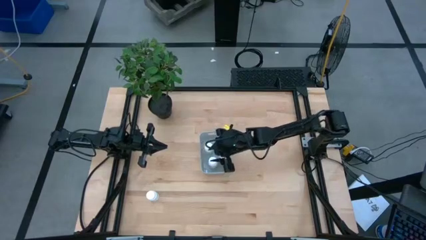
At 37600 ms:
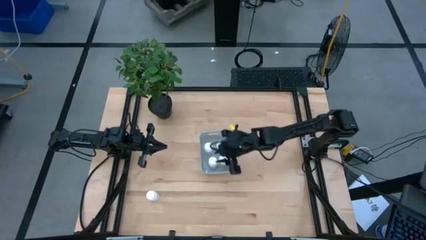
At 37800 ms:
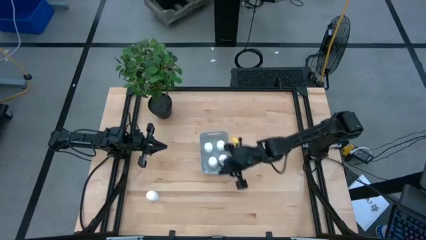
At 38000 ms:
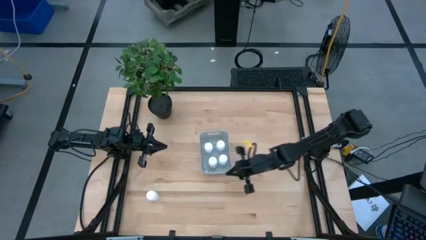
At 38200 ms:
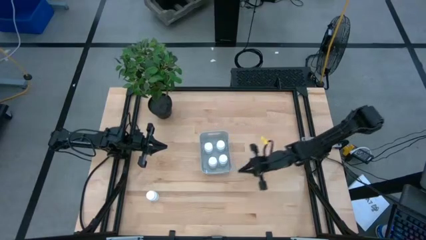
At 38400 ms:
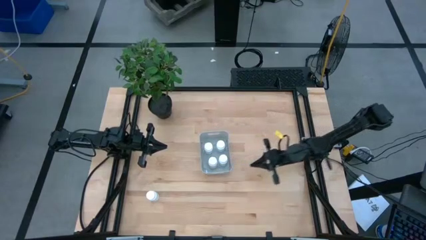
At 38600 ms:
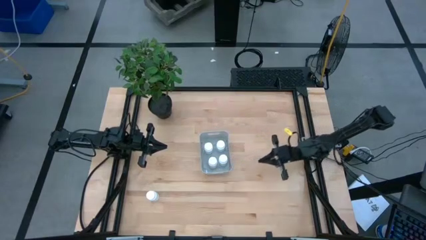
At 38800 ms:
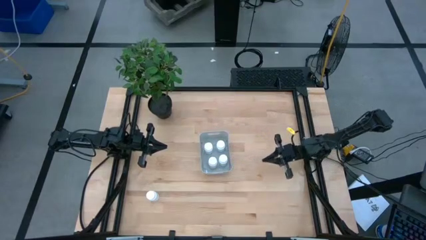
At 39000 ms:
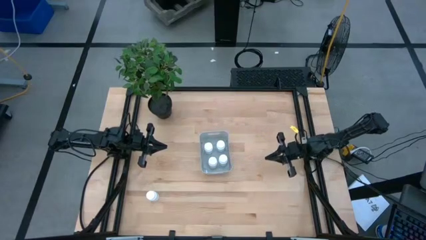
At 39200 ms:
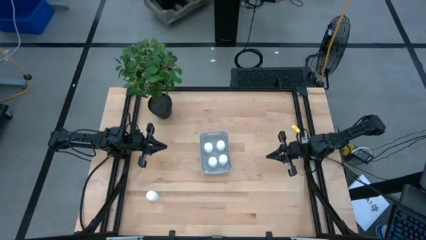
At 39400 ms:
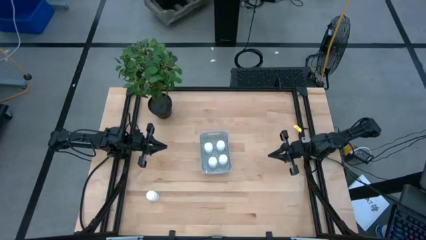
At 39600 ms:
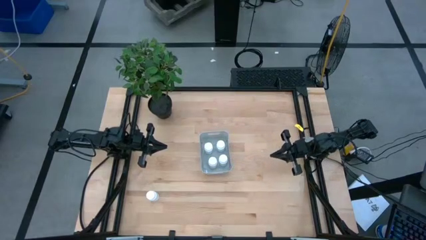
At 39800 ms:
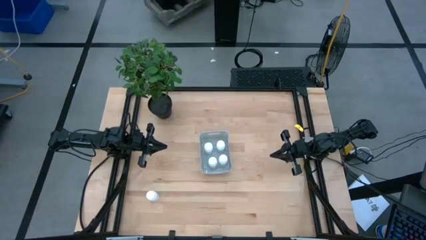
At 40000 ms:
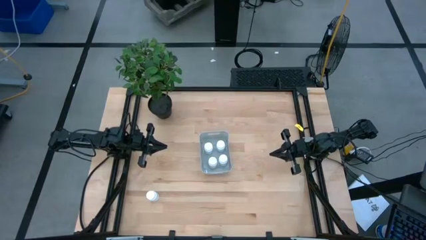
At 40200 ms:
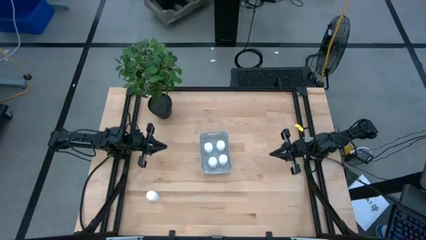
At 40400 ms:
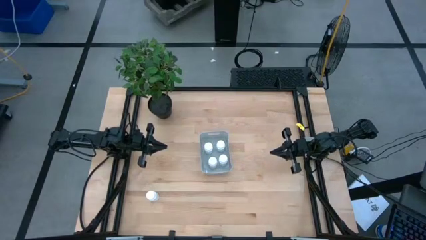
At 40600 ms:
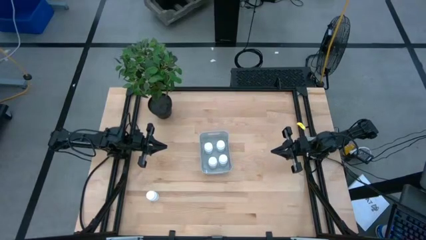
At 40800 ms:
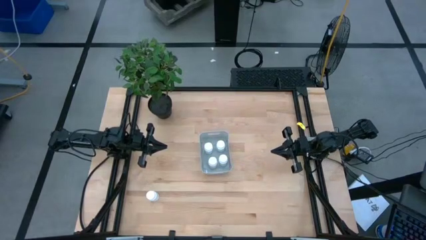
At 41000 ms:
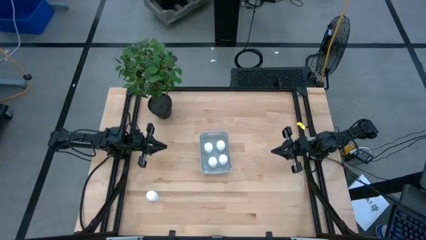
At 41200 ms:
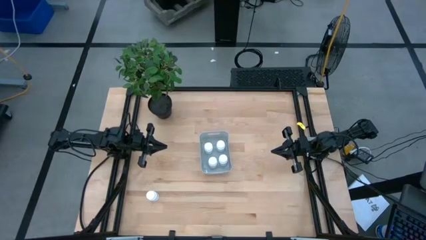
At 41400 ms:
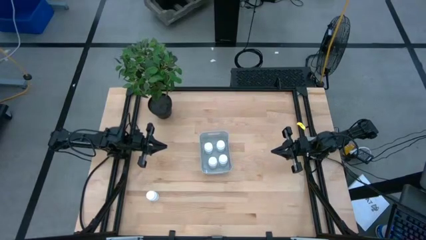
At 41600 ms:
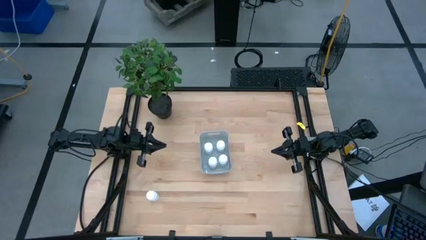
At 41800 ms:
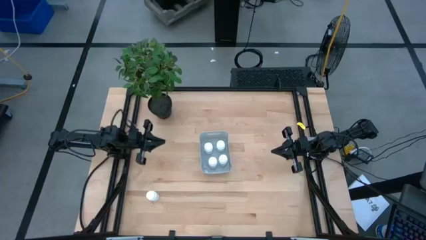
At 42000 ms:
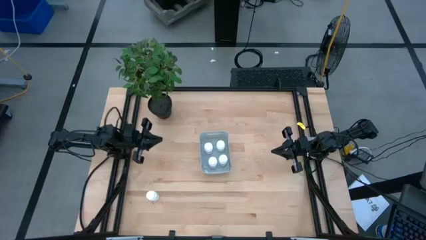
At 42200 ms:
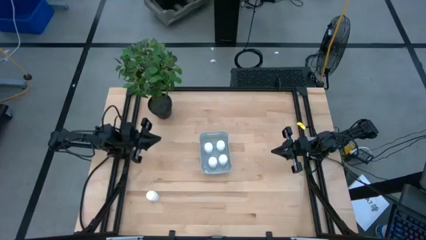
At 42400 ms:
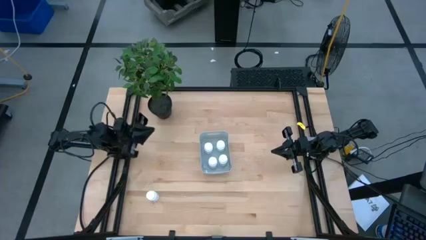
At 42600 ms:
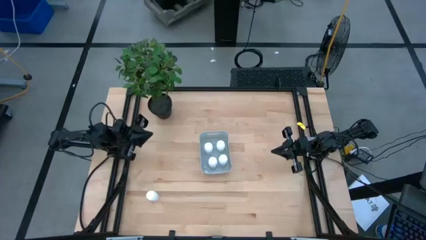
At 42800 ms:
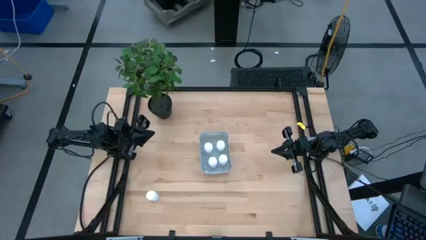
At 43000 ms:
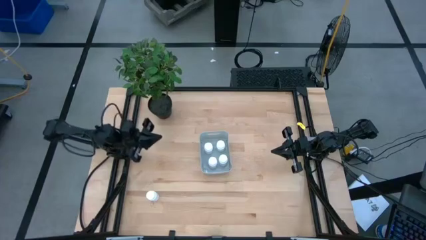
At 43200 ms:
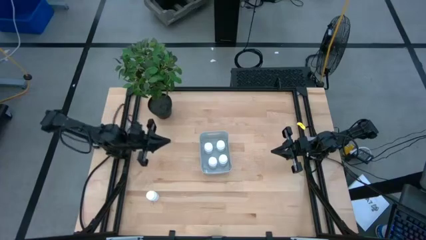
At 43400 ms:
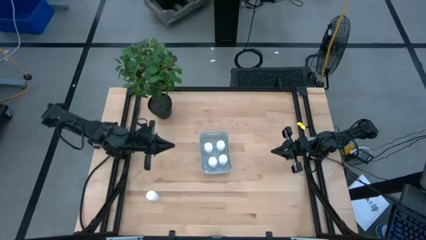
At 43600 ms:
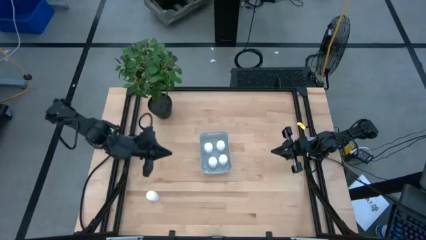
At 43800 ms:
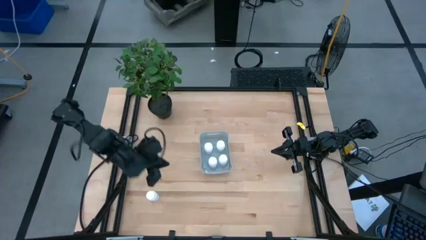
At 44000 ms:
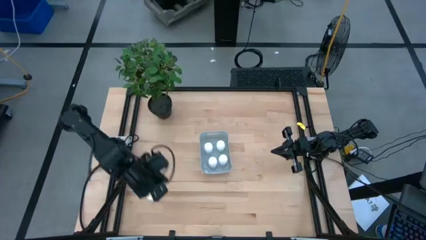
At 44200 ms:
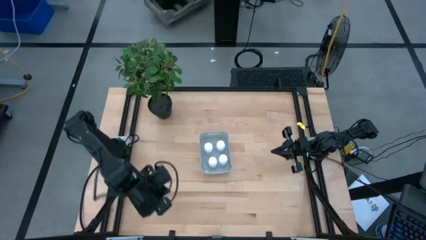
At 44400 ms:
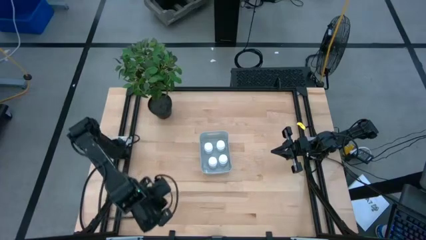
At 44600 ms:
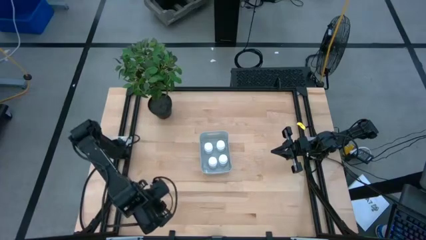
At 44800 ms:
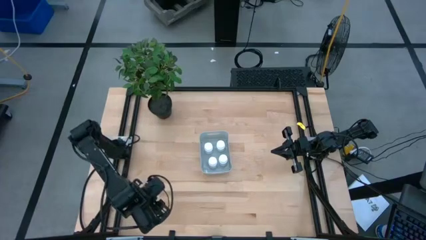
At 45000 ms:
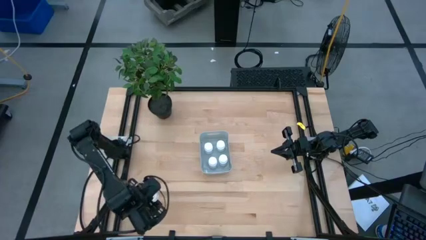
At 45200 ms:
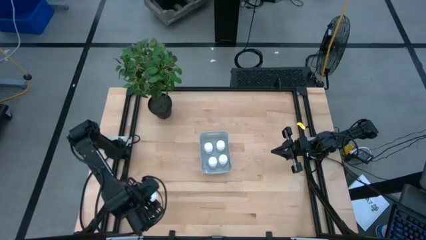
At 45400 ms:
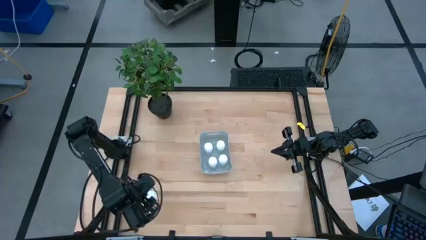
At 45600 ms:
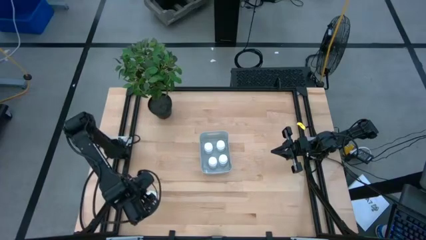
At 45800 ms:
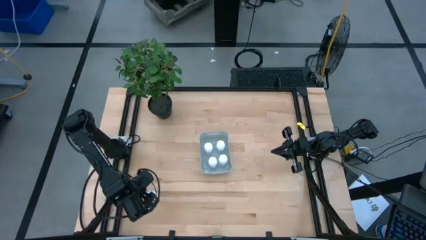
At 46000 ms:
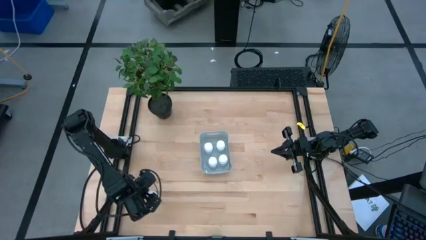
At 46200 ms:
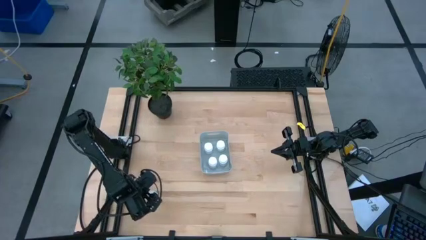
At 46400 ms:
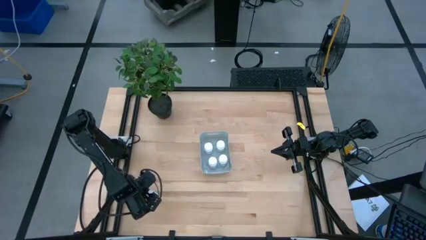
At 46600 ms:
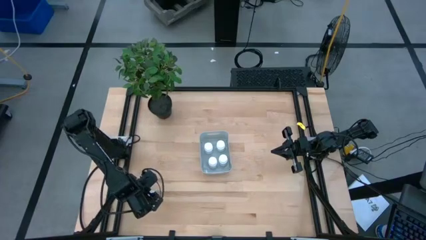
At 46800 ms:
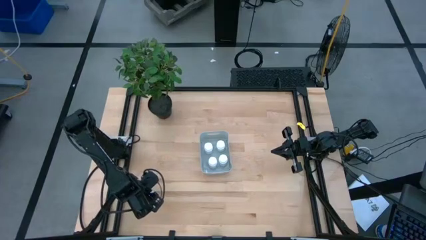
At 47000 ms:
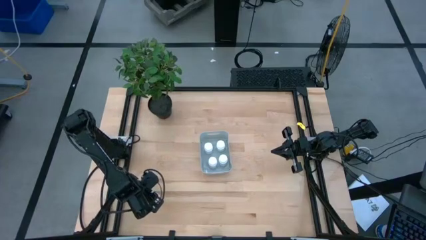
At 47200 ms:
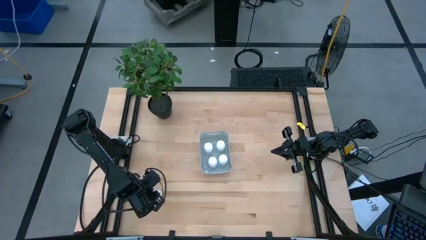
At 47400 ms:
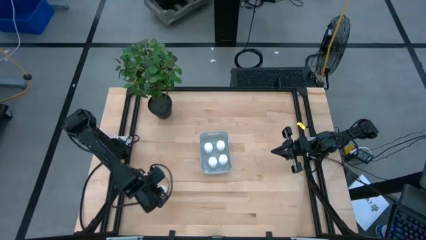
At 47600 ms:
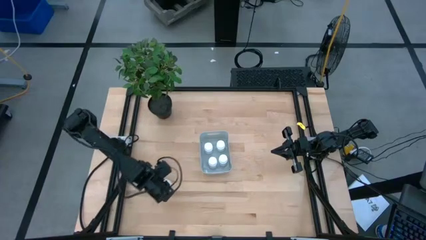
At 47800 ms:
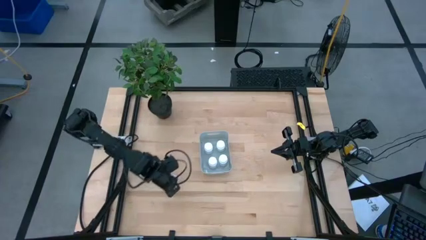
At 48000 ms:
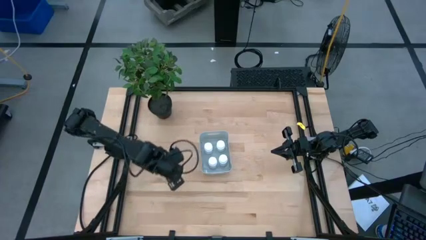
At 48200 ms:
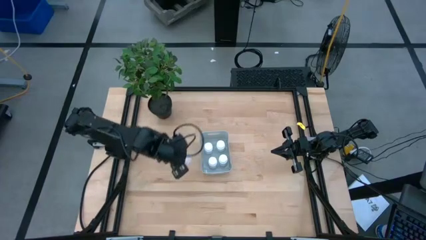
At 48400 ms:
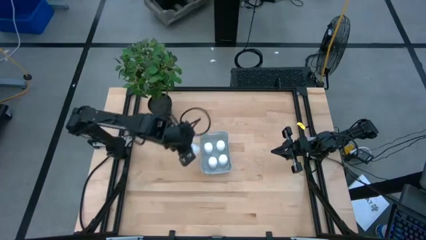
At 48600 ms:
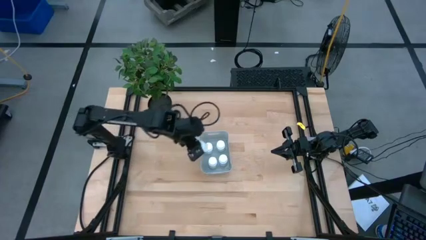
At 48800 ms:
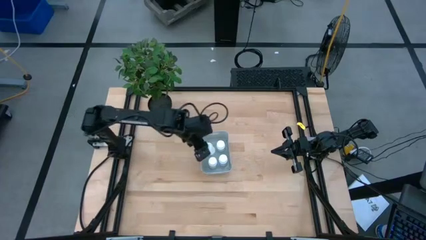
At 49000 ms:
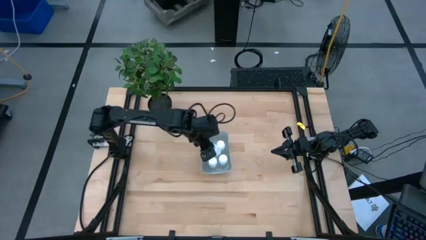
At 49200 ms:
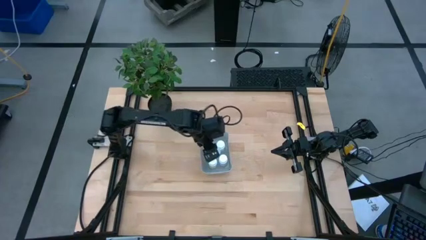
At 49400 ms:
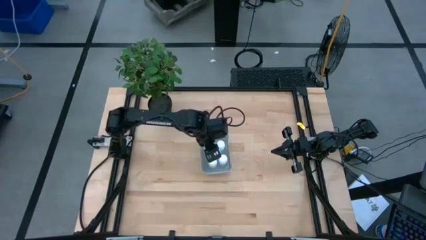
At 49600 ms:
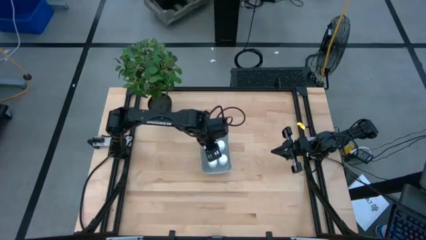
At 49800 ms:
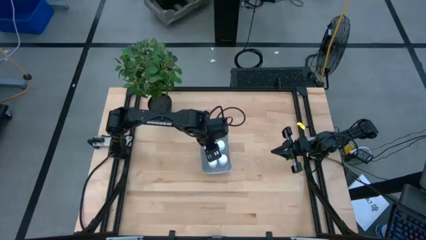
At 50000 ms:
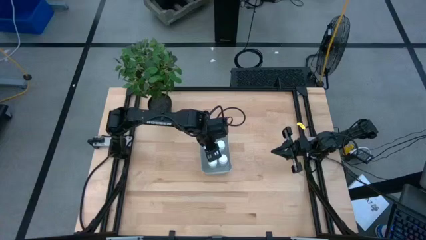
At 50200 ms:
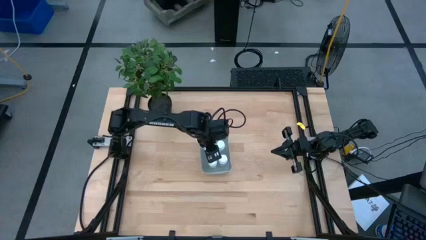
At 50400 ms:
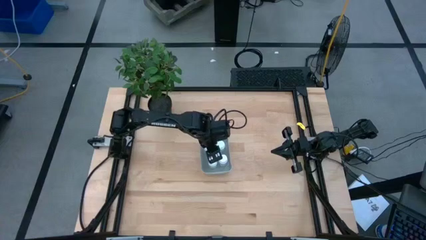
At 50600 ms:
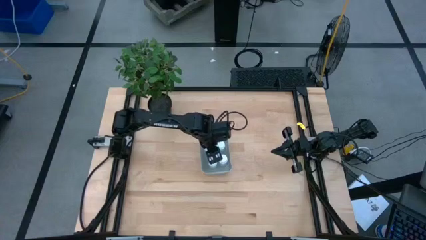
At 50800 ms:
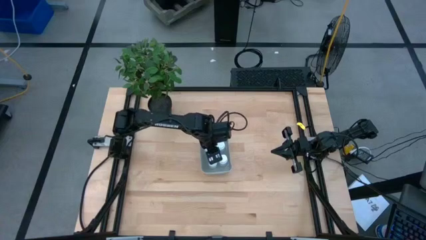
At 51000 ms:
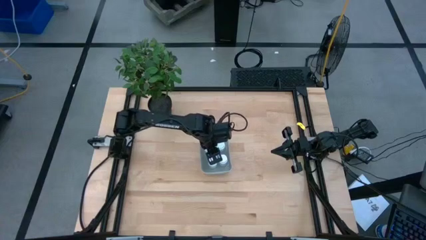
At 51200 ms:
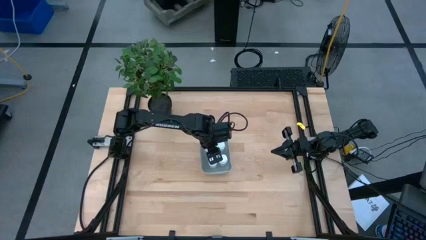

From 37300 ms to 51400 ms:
Task: Pick and place pill bottles into a basket
Put the white medicine bottle into the gray bin

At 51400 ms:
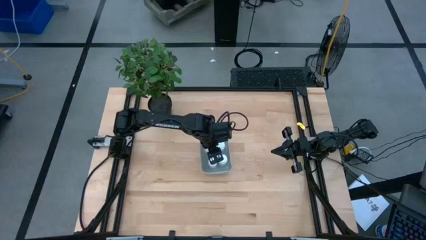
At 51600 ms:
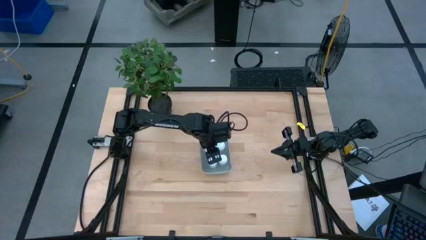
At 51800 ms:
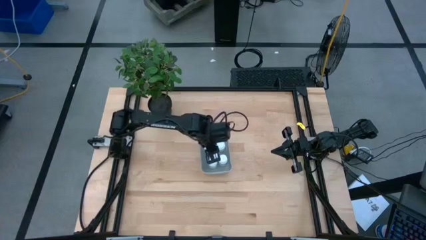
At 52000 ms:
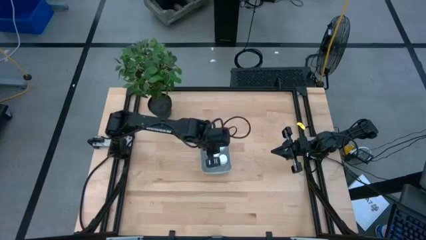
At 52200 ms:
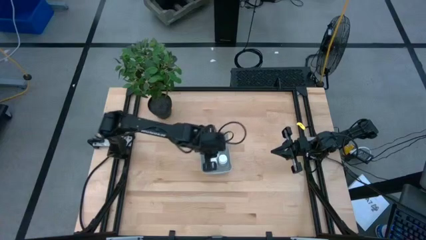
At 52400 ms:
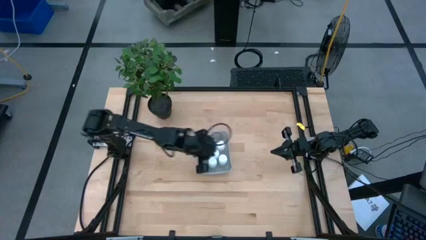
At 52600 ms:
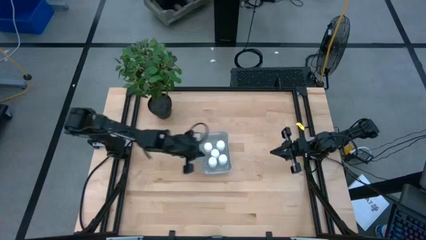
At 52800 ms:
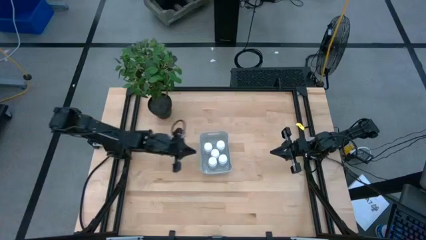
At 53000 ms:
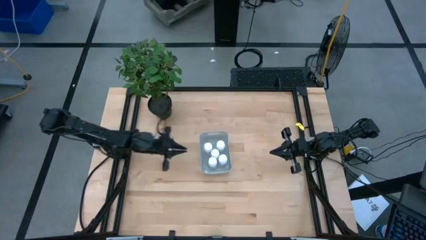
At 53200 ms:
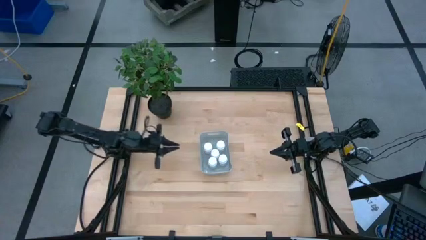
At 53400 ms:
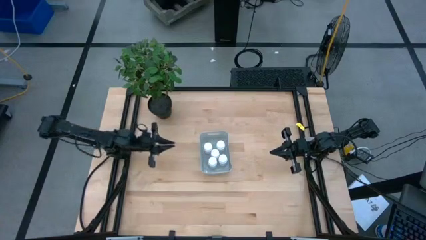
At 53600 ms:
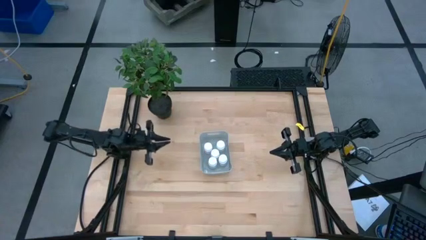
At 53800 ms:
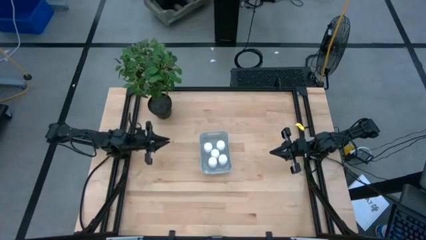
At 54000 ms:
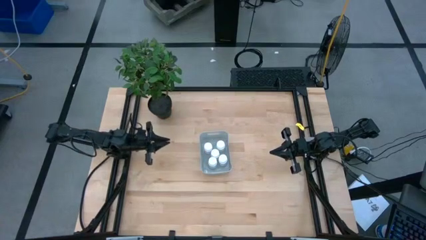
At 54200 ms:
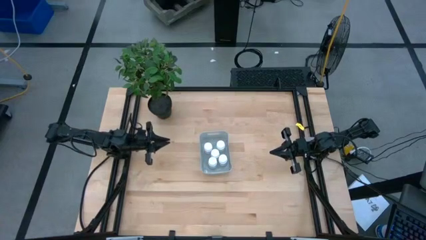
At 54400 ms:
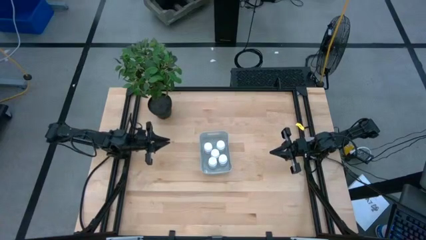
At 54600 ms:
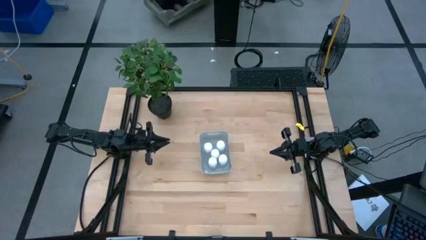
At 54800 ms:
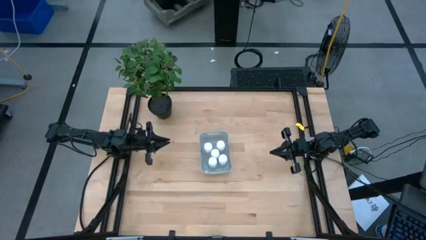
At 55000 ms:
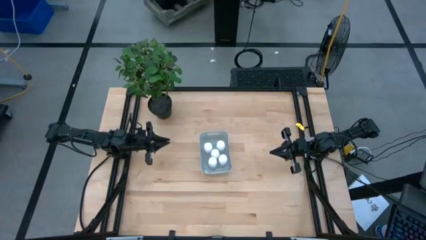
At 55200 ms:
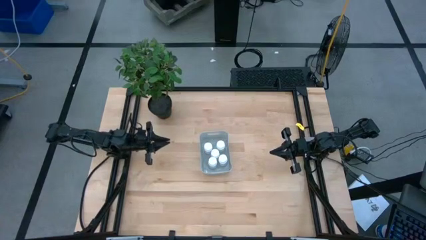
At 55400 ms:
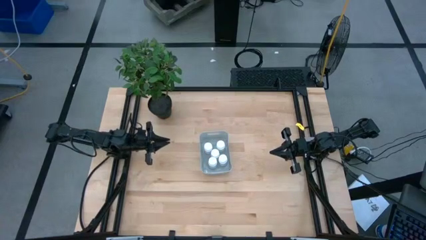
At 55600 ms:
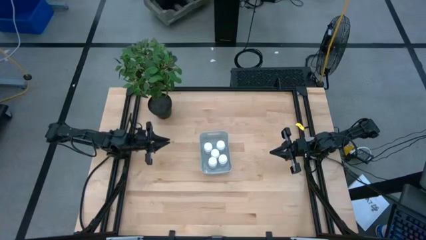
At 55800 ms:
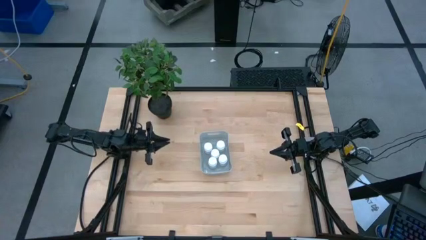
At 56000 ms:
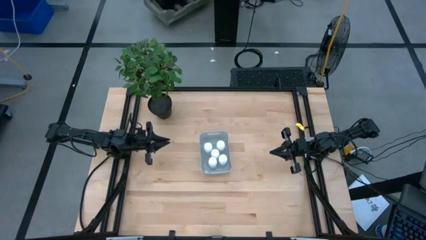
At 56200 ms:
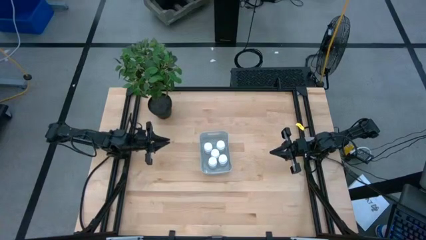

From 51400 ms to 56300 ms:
Return to Home Position
